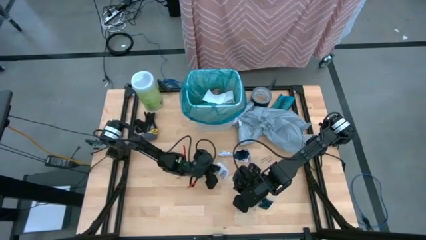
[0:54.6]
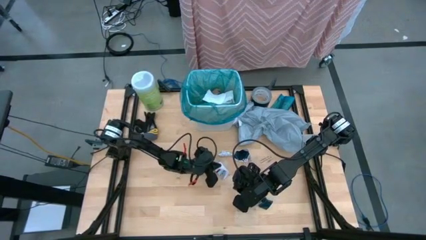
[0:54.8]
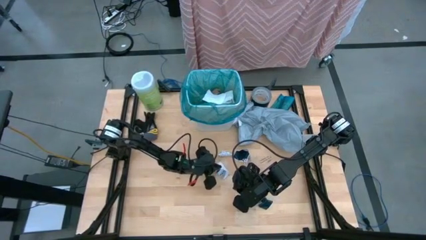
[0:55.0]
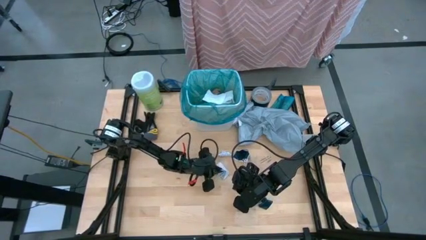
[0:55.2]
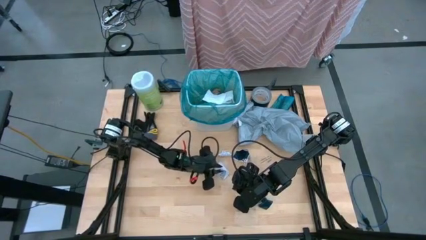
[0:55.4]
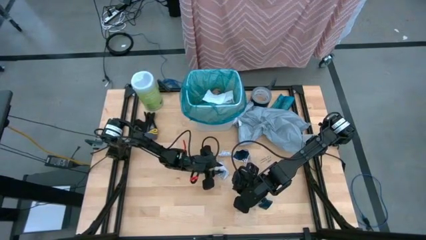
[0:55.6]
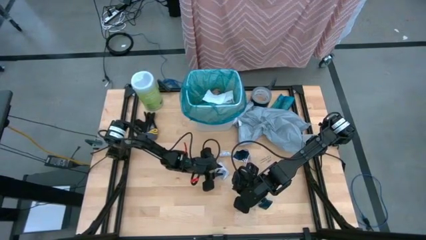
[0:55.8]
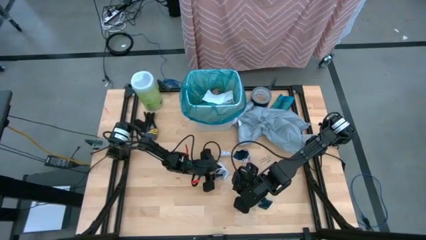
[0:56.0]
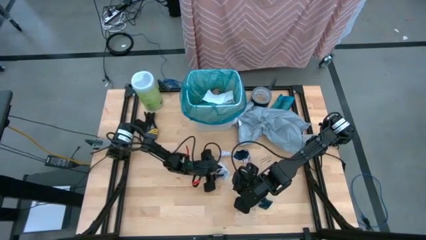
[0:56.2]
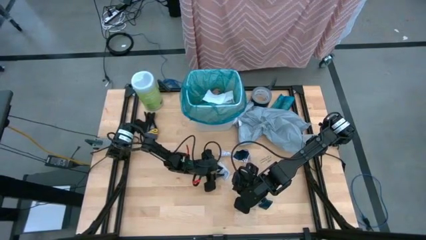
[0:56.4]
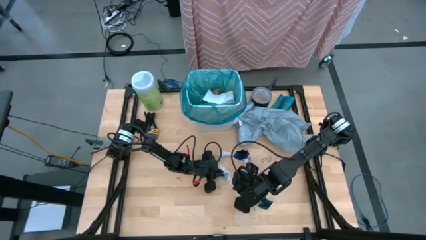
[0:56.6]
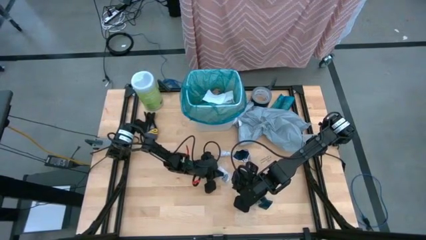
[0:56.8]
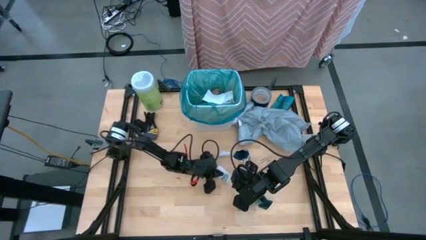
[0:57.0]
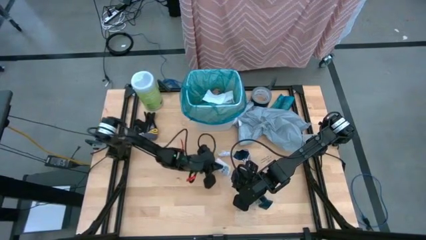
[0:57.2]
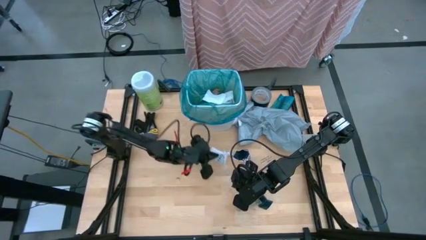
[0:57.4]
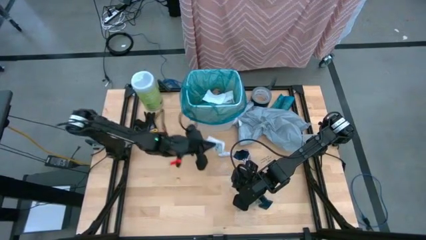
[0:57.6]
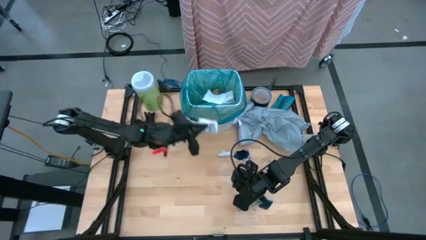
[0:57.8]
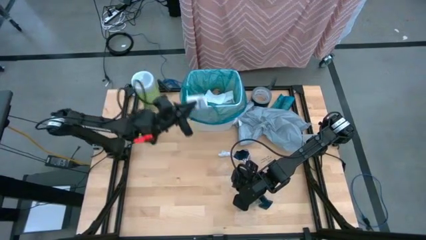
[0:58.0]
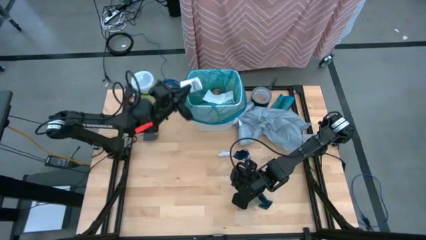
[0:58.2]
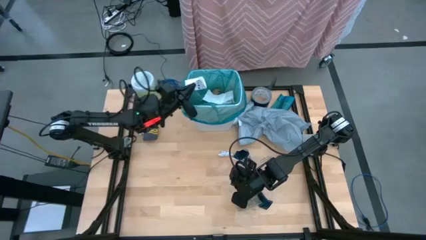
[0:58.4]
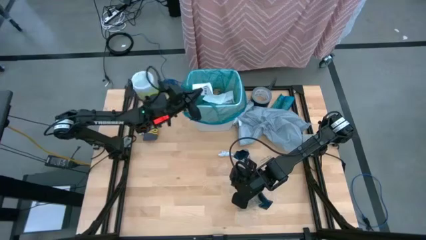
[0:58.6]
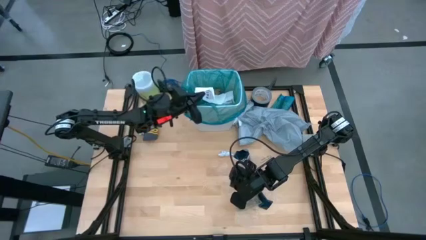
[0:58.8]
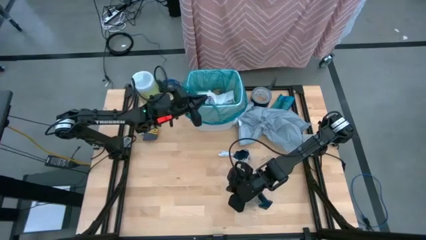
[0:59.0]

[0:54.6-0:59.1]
Task: place trash/remove bag and relplace
Put the white paper into the trash bin

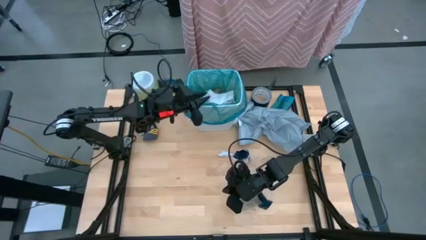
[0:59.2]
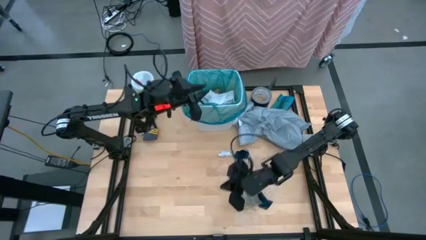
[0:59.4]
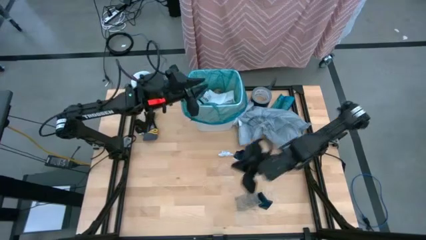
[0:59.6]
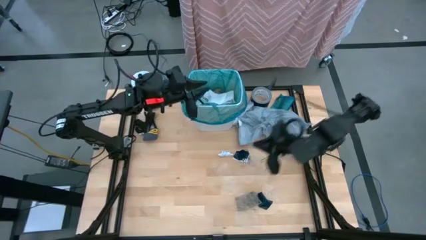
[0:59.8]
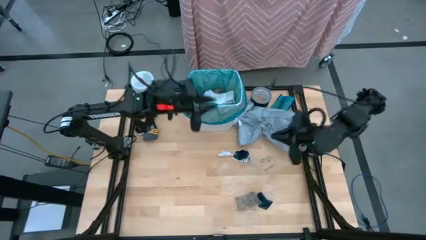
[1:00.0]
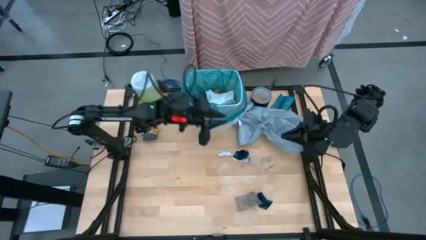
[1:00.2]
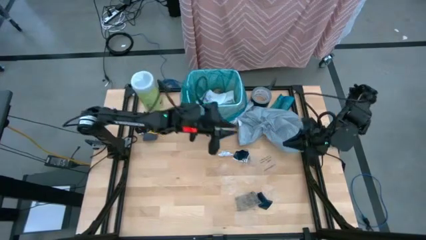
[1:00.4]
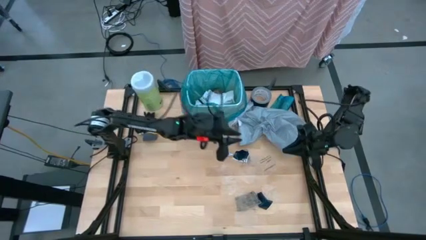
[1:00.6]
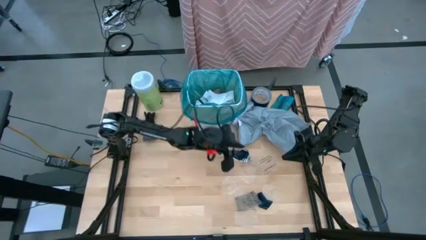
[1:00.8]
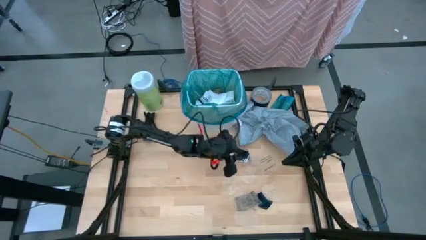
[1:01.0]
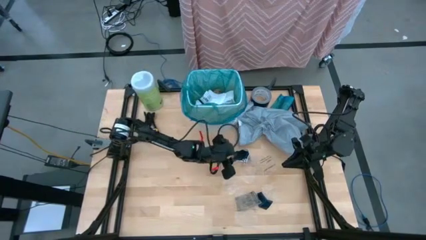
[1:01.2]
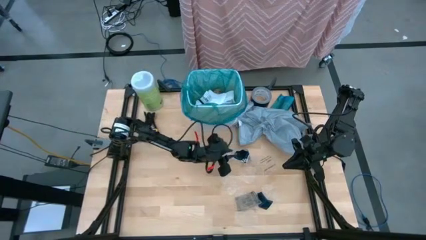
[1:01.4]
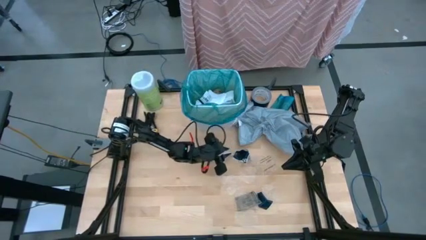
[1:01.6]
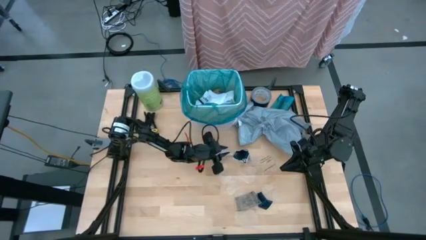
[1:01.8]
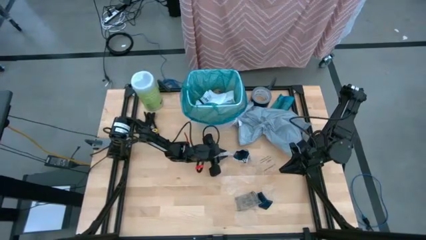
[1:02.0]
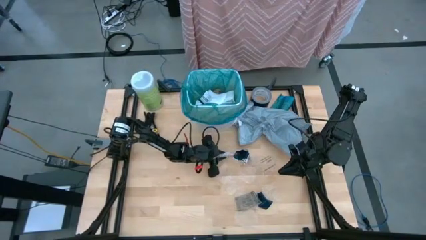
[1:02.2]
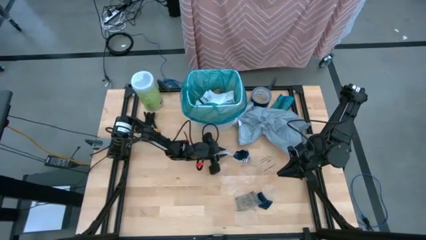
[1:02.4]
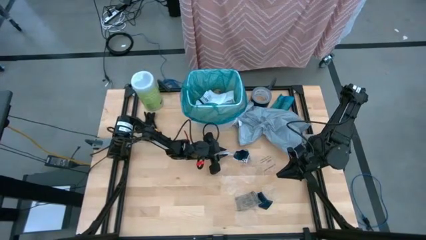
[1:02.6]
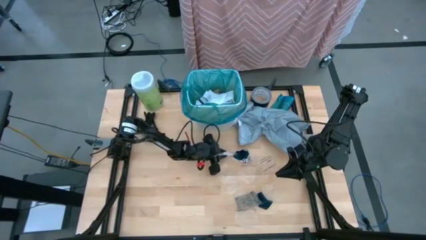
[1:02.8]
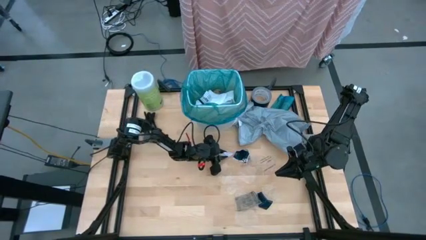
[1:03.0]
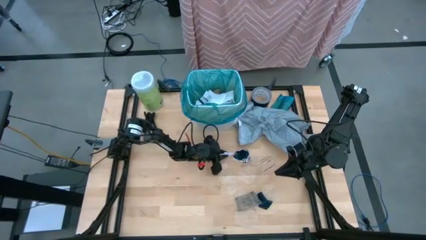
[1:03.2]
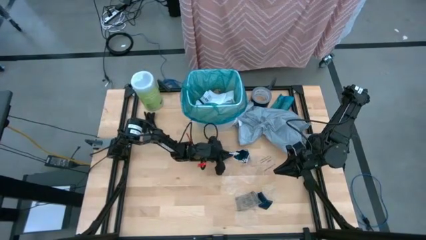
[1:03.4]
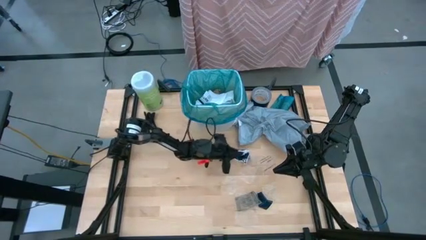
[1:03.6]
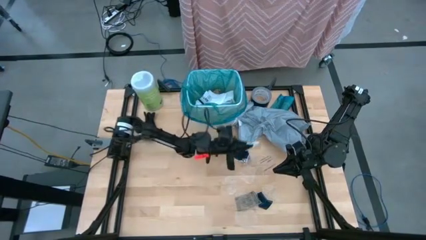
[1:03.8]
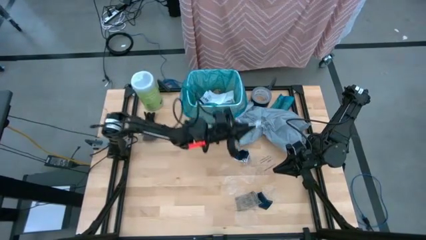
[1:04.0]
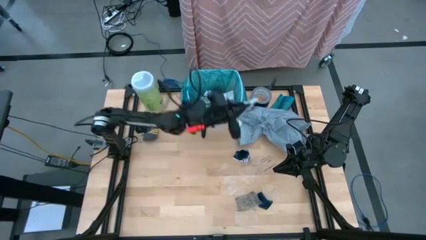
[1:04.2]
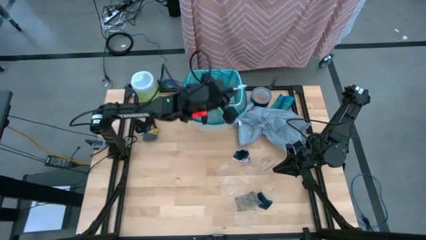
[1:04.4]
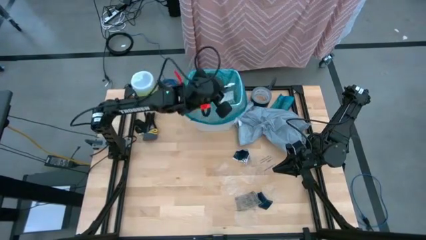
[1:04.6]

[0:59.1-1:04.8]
Put the white paper into the trash bin

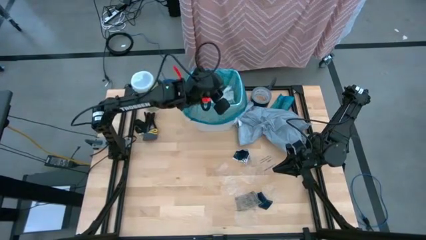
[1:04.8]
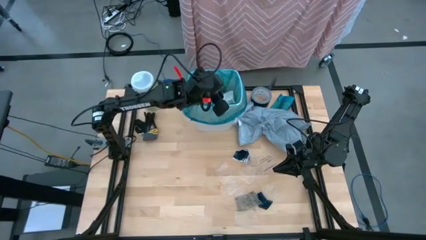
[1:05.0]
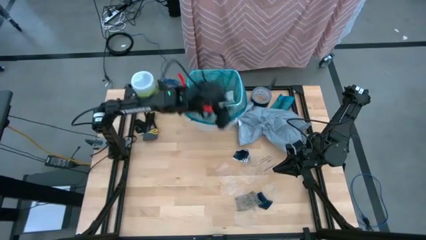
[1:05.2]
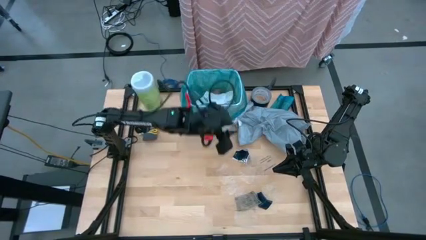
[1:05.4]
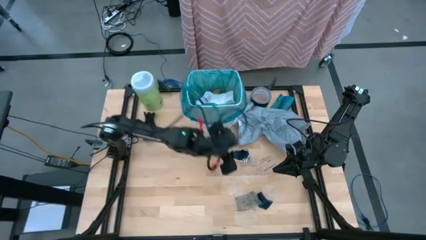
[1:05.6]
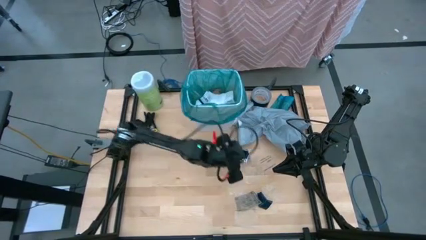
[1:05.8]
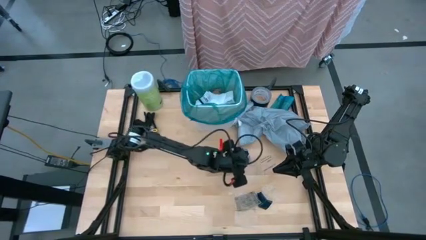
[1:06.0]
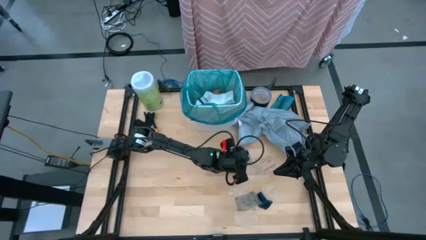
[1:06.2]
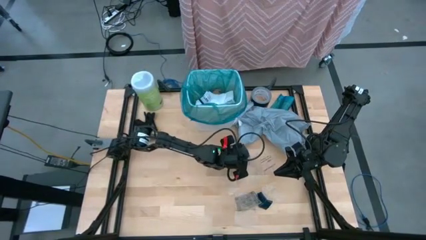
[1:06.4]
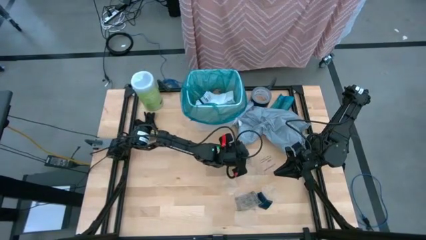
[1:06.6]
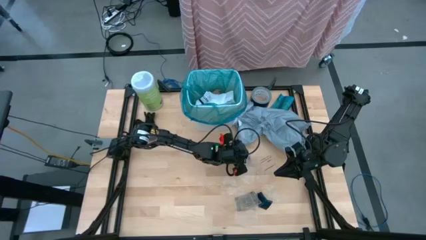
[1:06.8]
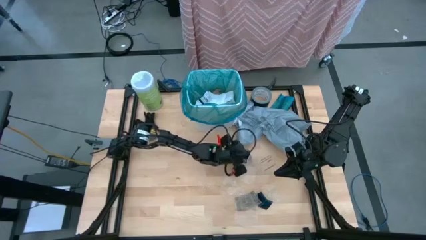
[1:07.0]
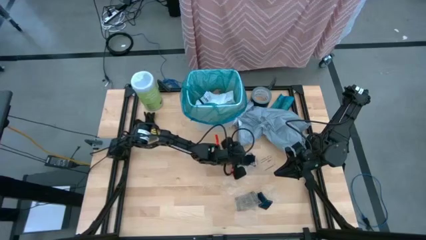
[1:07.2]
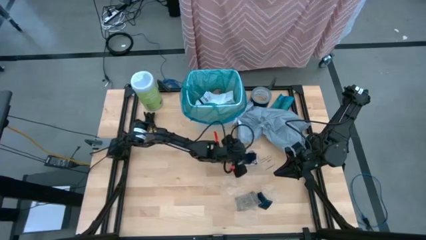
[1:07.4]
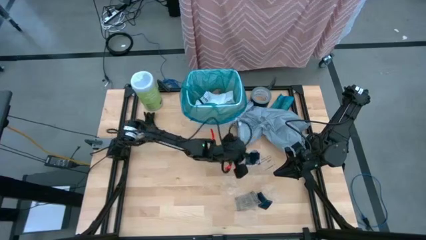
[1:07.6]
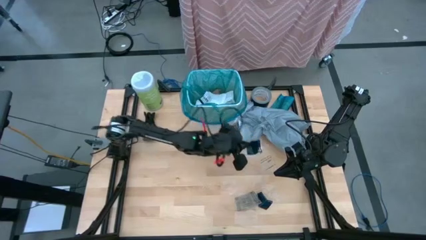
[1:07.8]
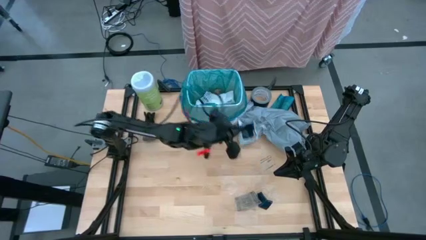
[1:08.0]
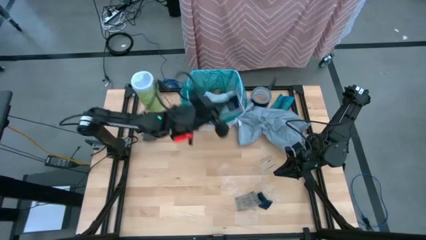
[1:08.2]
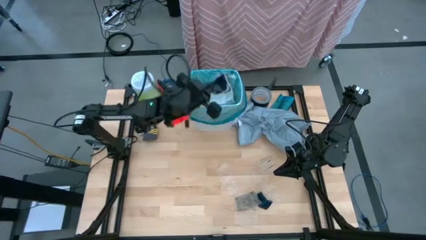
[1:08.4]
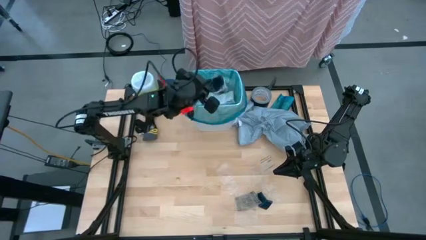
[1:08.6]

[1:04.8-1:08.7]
Put the white paper into the trash bin

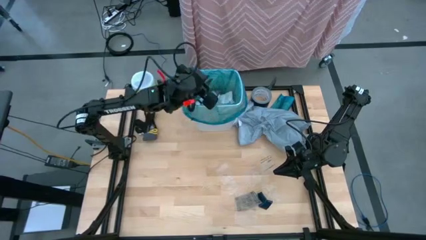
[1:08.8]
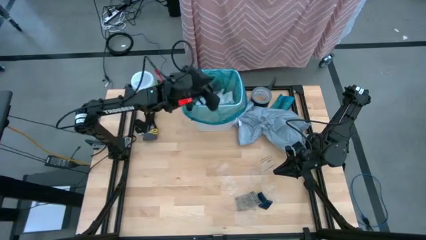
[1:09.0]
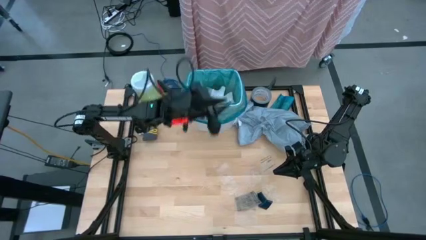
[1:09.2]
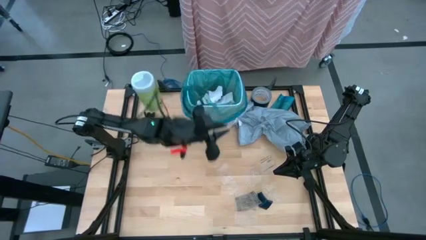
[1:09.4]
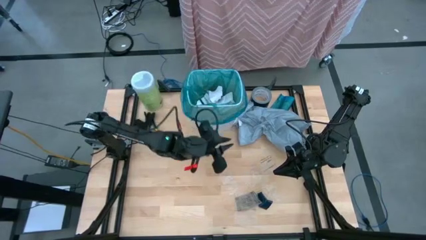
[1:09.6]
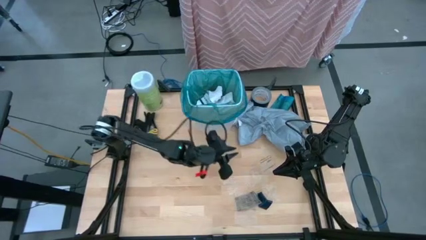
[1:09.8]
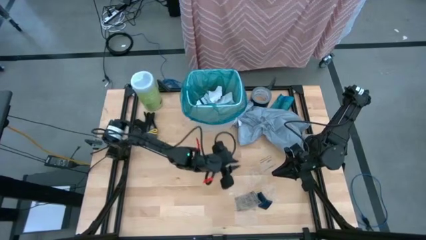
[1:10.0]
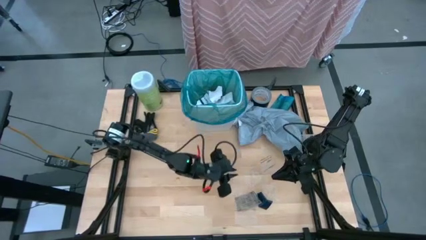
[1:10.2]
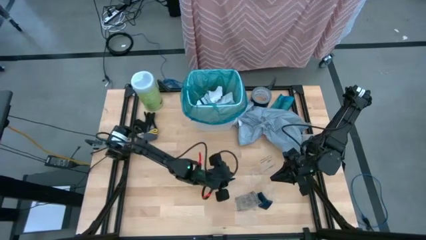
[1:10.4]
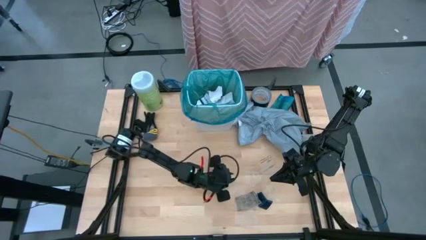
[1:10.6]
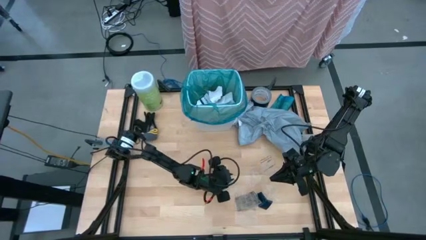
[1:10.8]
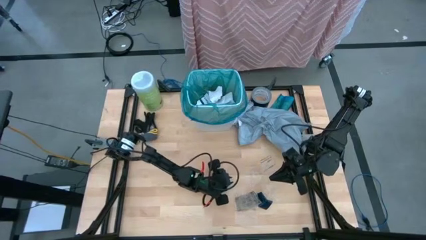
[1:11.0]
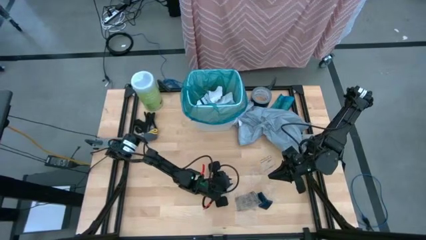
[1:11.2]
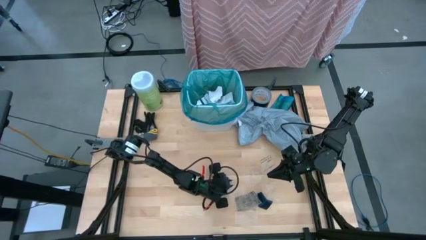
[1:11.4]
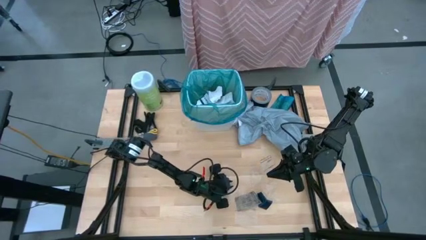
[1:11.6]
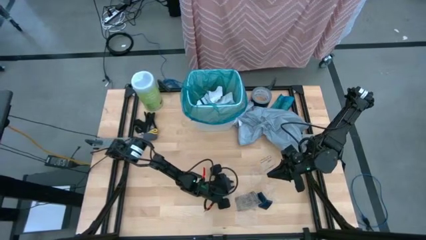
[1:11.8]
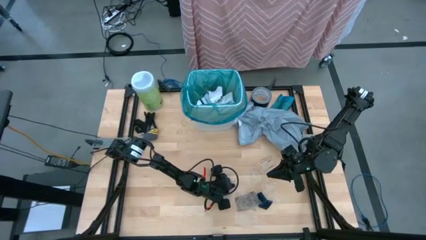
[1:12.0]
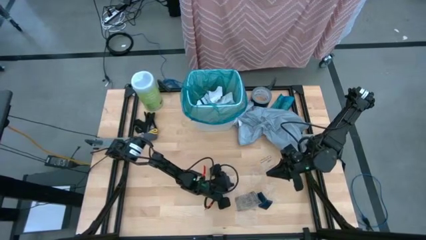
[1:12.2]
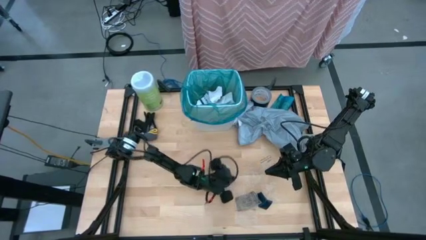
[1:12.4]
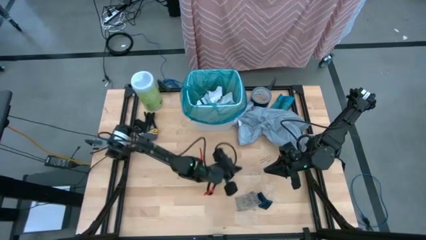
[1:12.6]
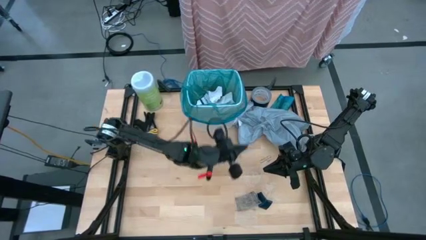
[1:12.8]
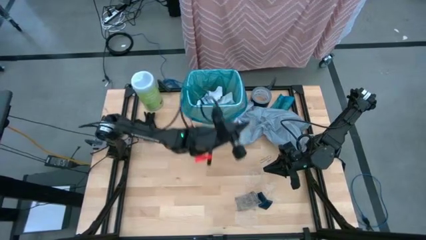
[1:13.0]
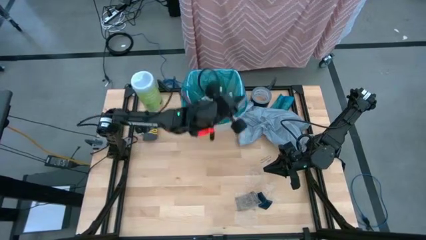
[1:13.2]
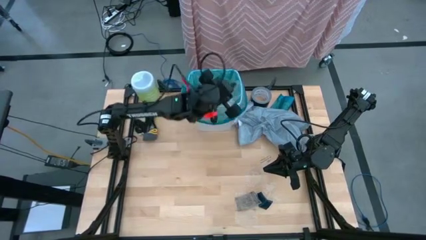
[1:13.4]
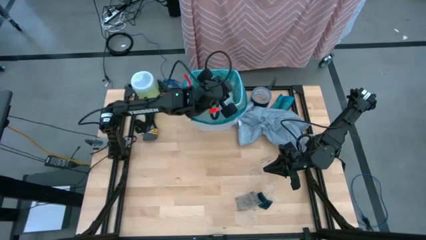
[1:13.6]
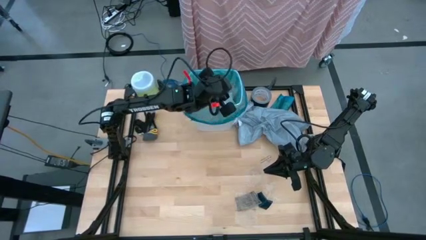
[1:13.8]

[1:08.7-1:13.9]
Put the transparent plastic material into the trash bin
